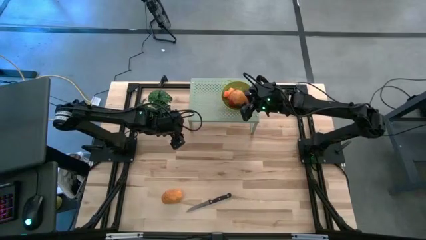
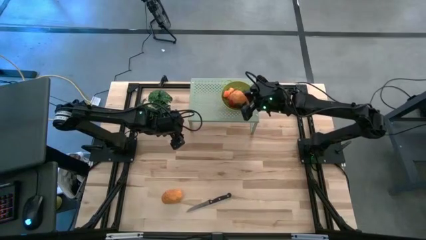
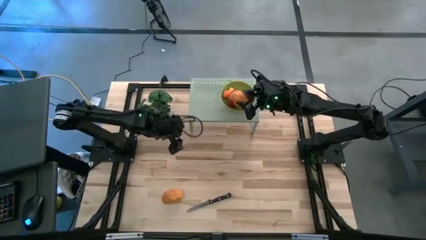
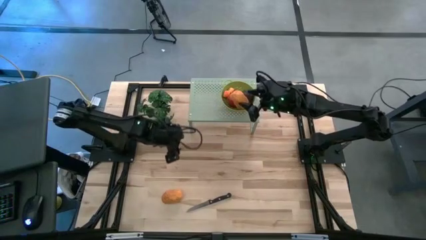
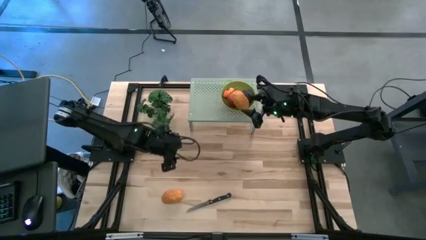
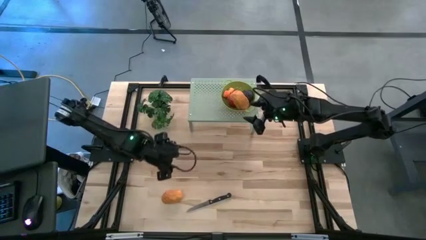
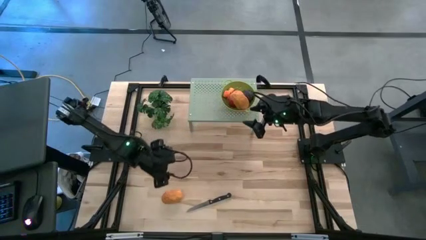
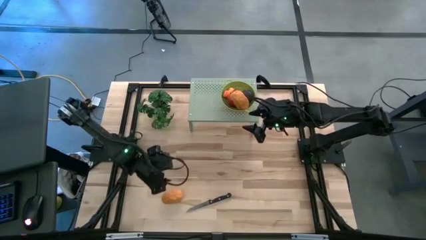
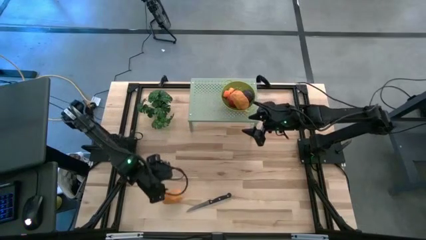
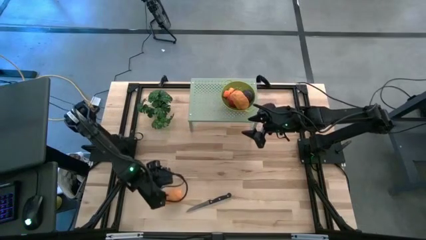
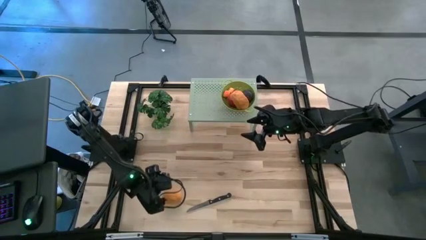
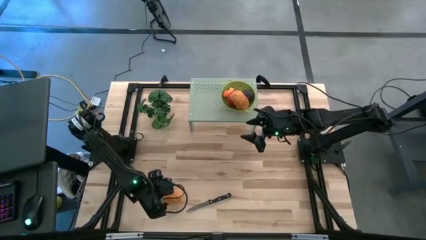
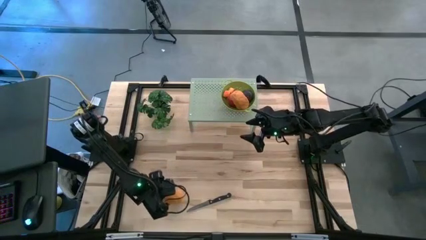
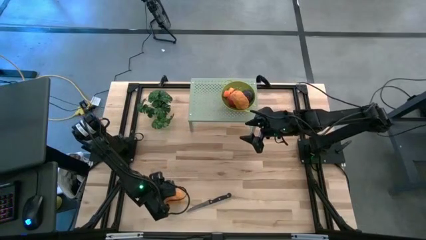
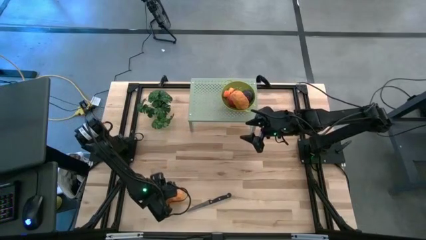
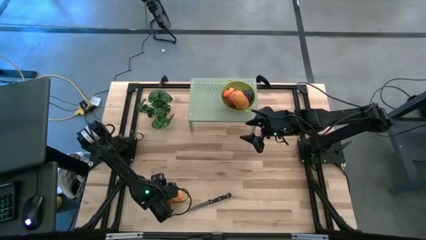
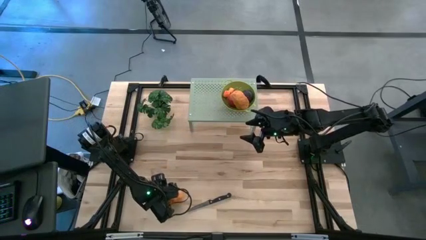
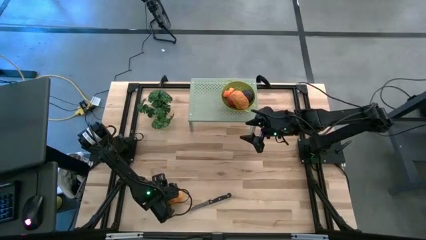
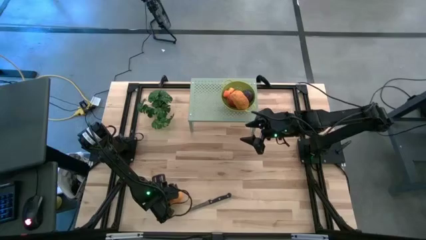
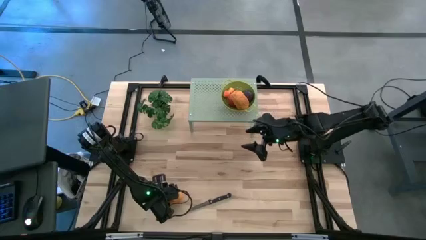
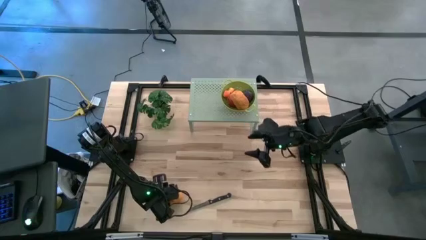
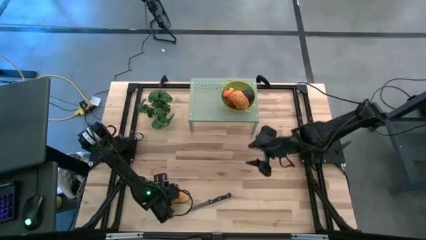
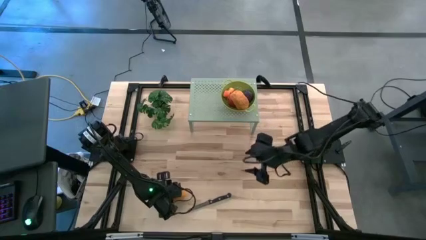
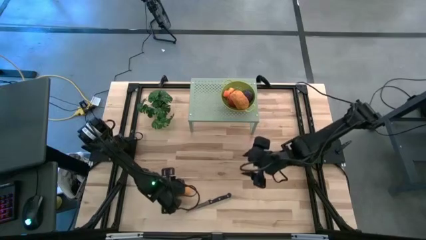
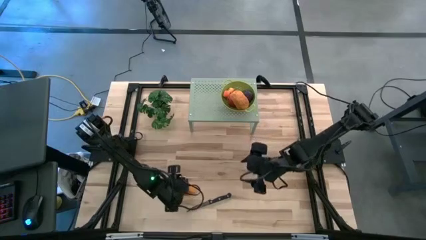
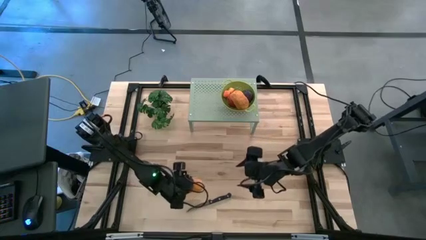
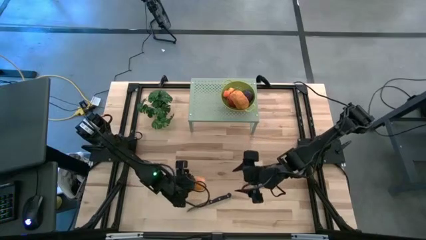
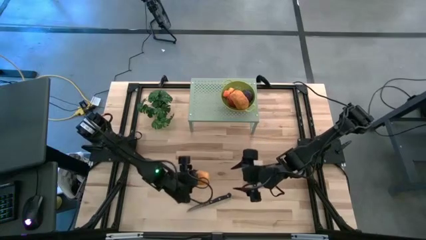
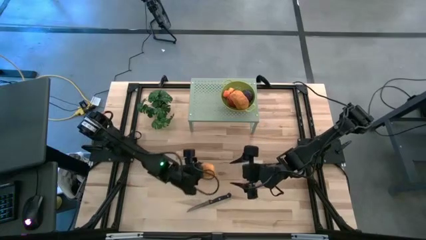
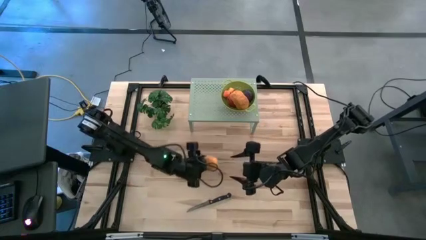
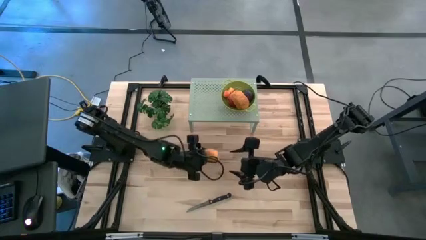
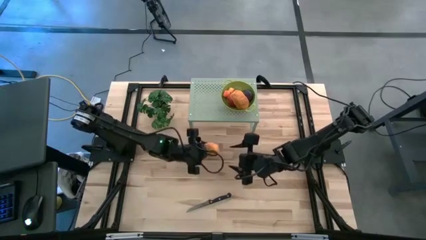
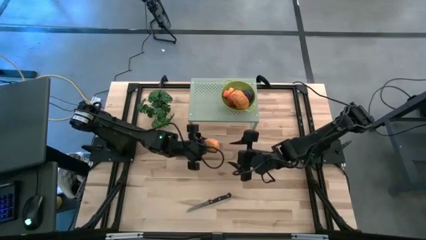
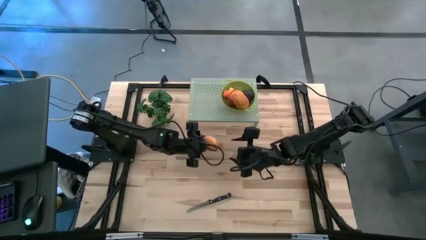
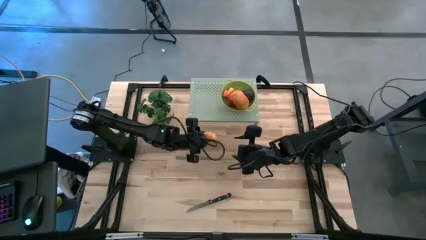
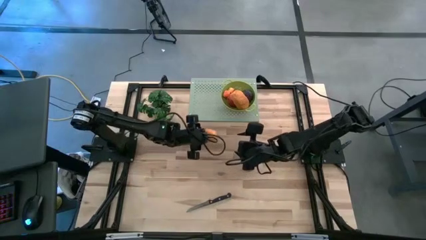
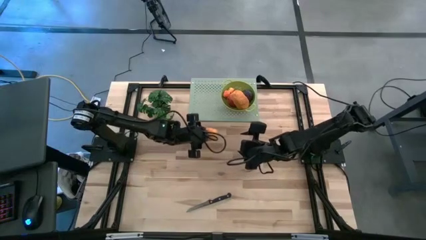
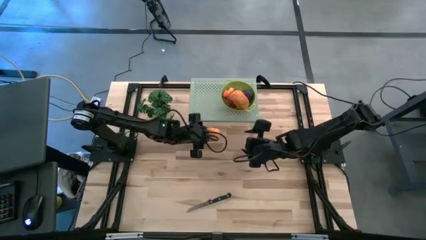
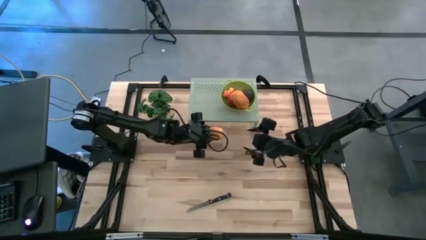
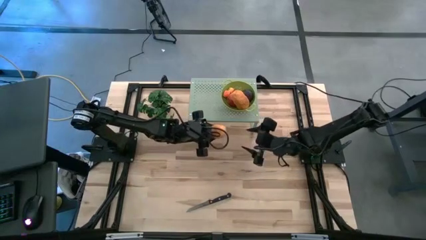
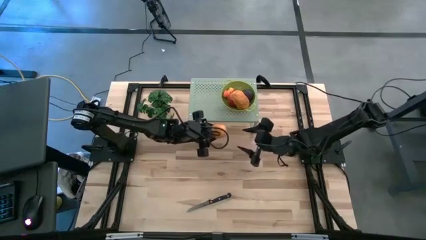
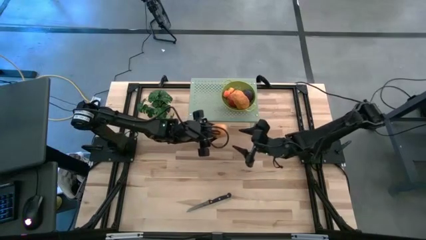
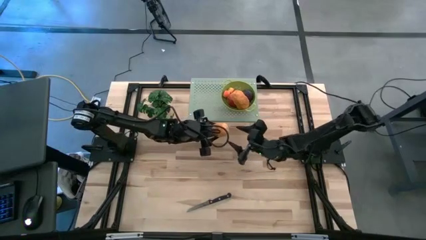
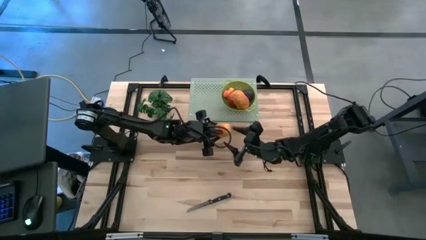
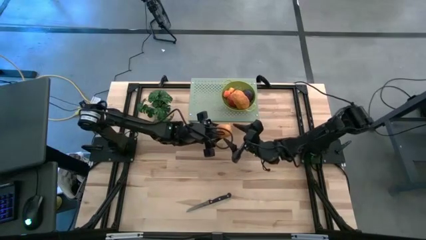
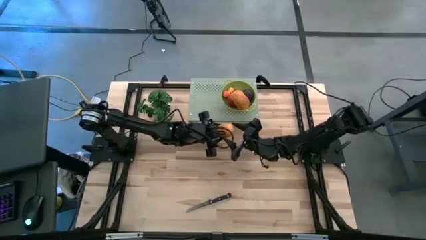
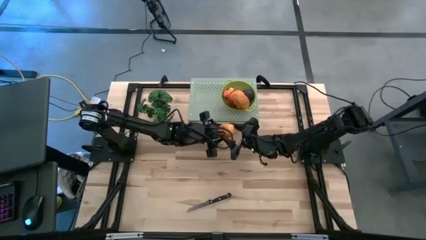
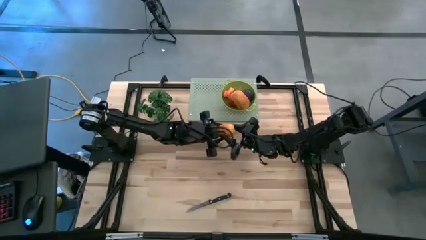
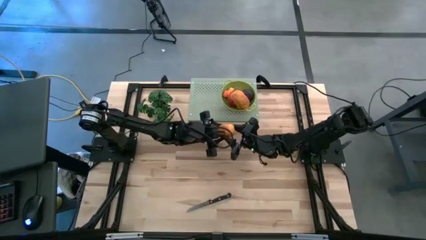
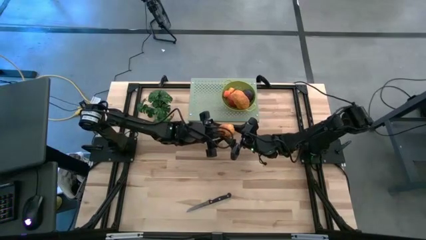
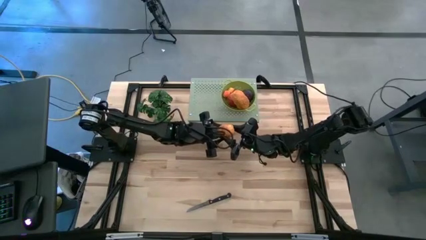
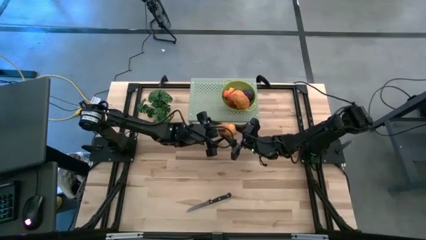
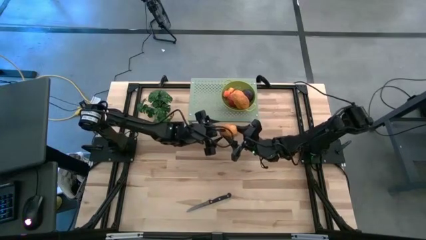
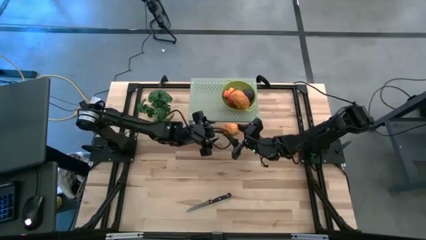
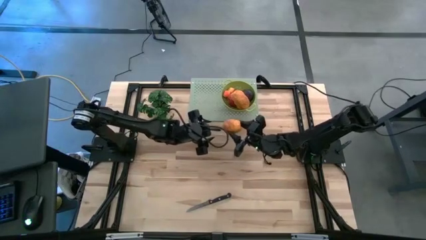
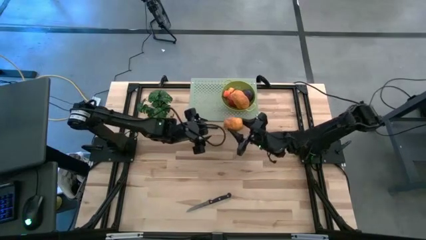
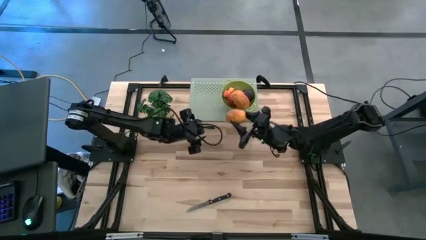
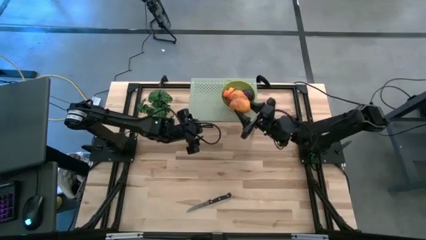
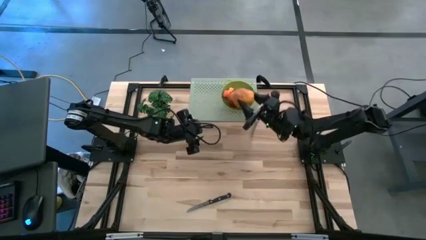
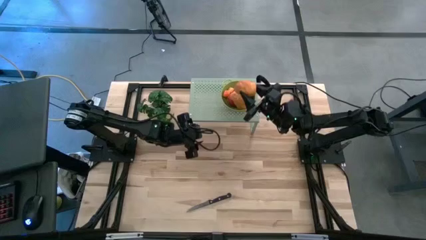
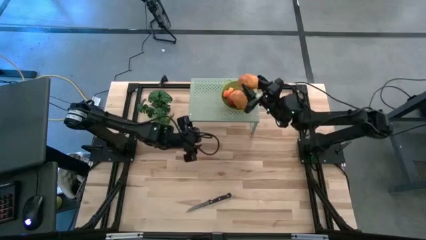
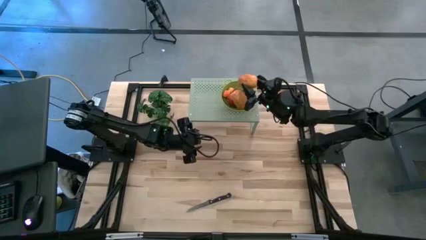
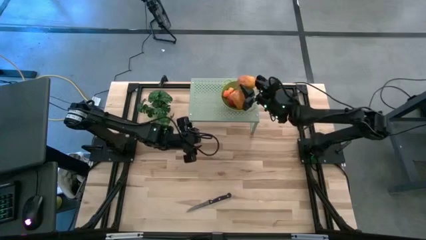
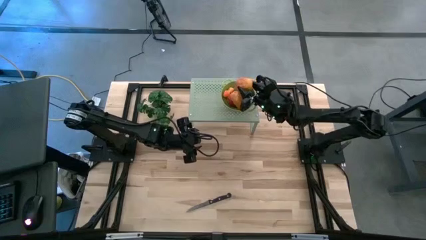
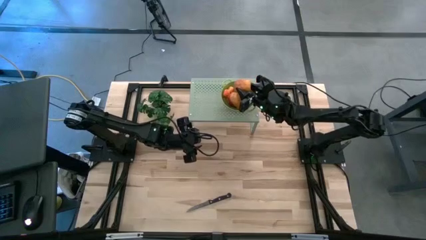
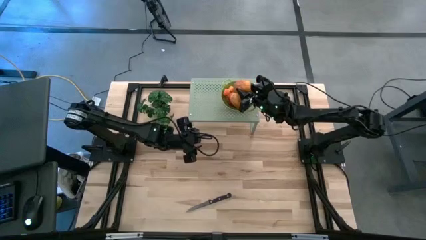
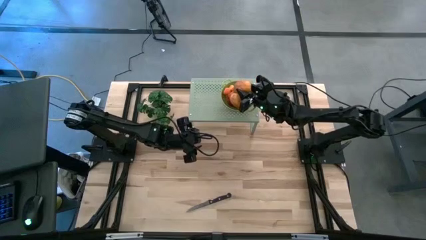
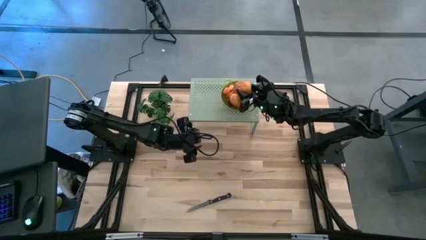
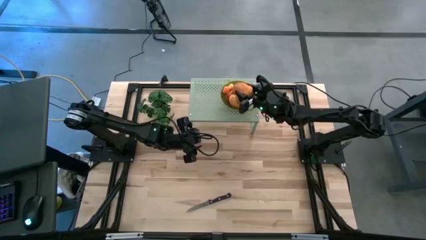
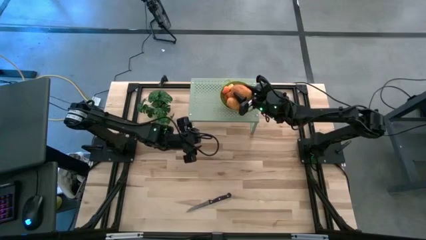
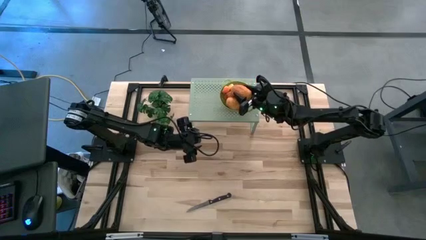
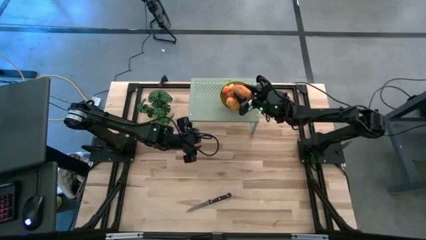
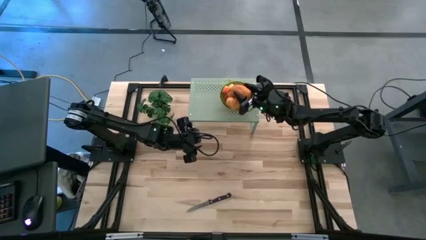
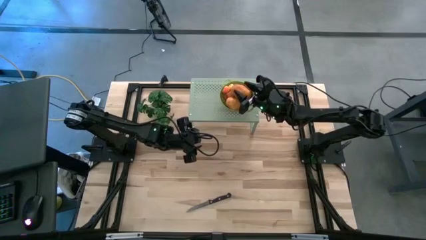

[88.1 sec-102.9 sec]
Task: Pick & Place Fruit
Put the mango into the strainer bowl on the shelf
